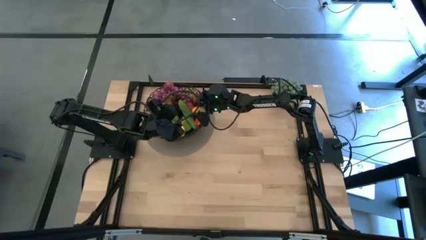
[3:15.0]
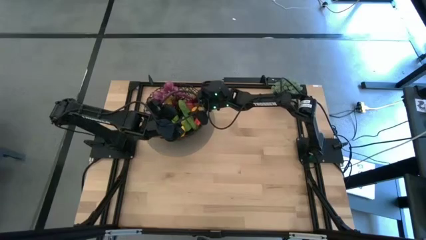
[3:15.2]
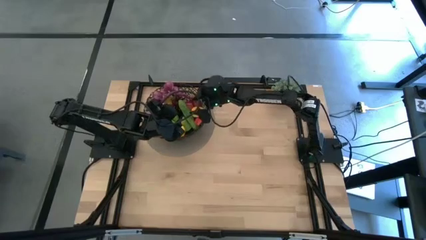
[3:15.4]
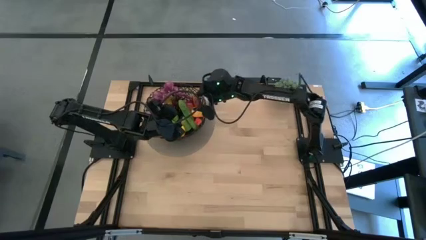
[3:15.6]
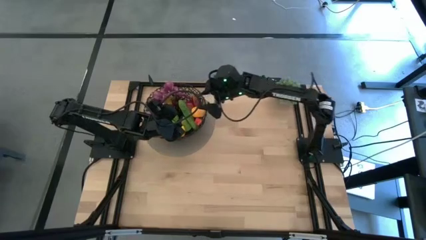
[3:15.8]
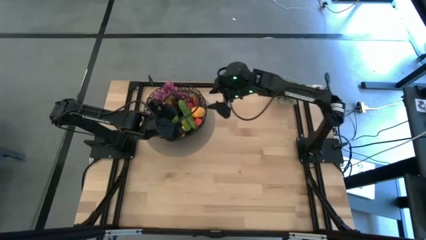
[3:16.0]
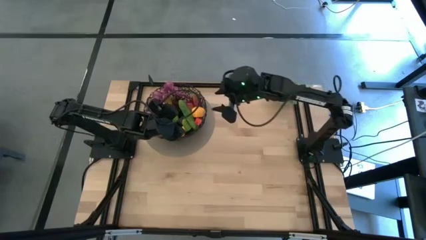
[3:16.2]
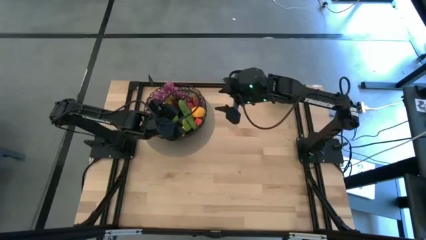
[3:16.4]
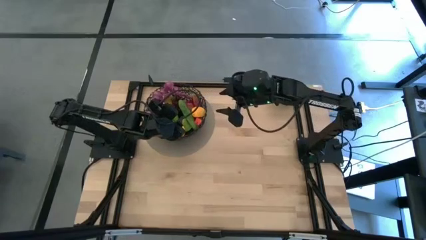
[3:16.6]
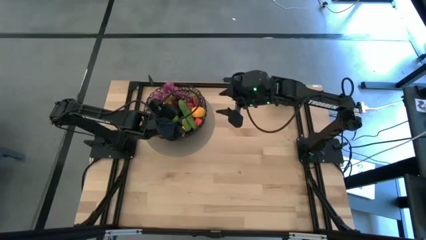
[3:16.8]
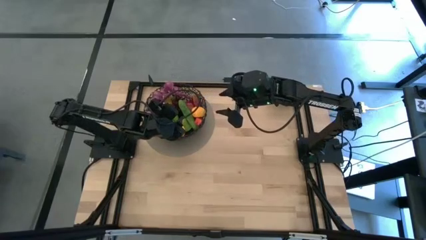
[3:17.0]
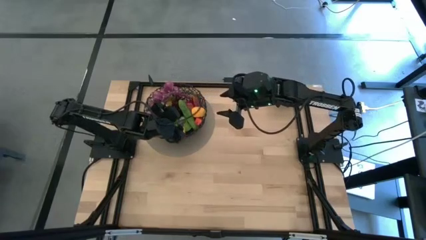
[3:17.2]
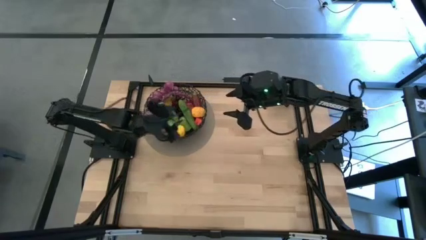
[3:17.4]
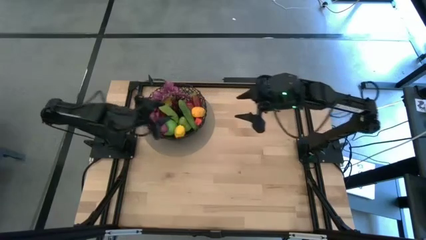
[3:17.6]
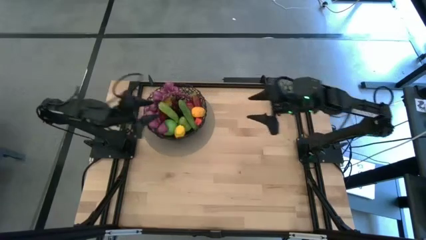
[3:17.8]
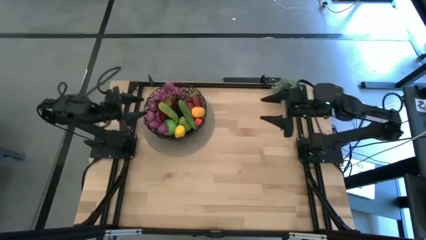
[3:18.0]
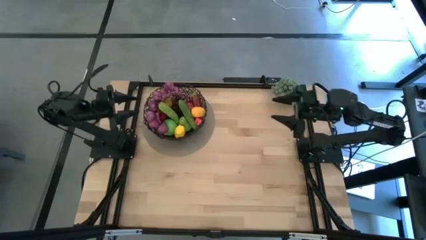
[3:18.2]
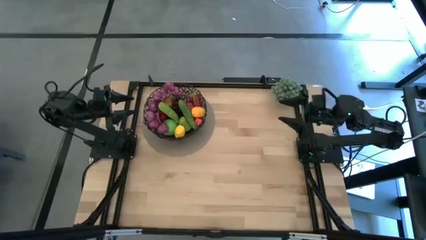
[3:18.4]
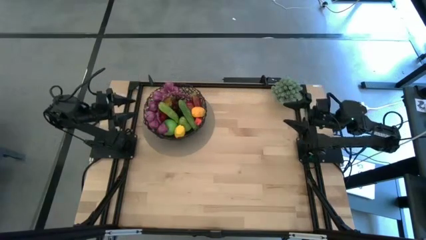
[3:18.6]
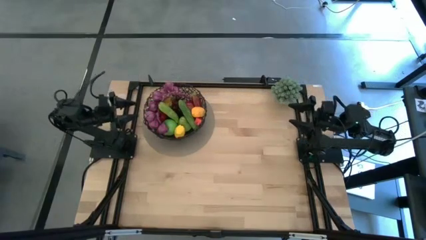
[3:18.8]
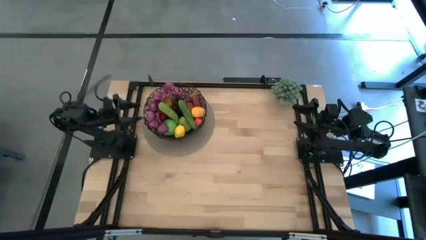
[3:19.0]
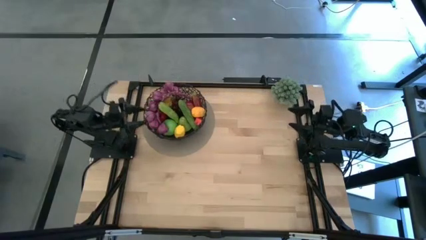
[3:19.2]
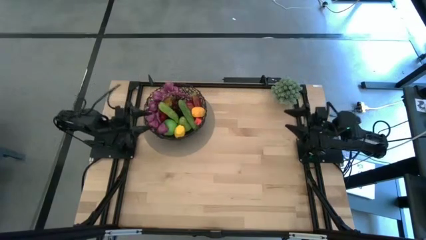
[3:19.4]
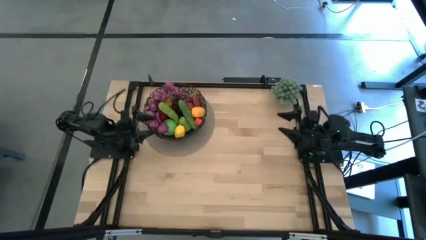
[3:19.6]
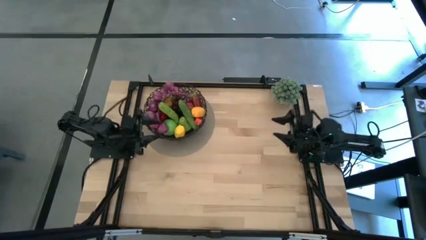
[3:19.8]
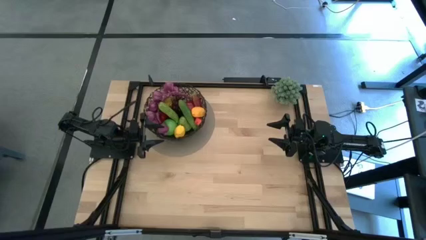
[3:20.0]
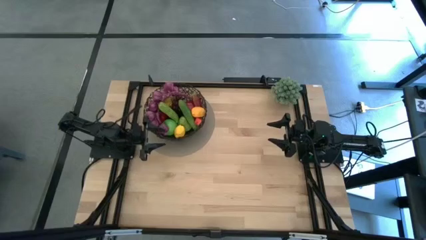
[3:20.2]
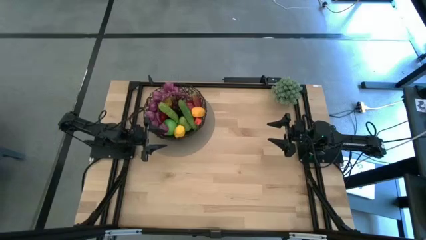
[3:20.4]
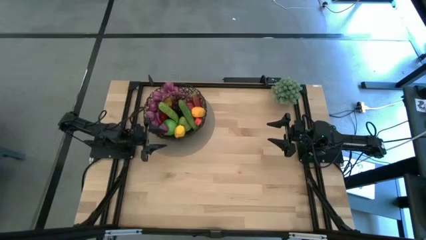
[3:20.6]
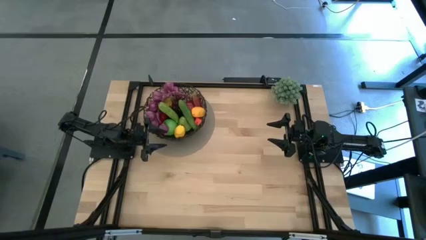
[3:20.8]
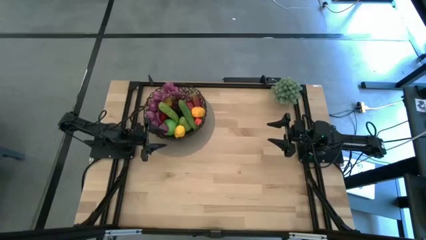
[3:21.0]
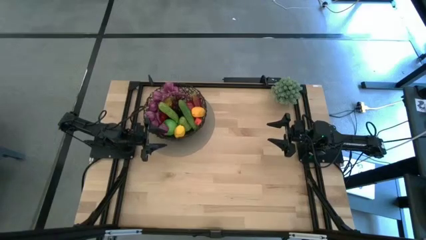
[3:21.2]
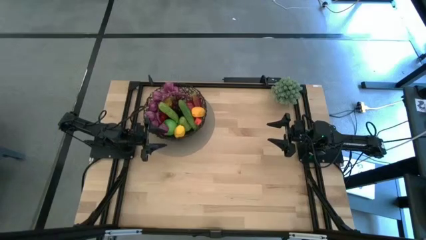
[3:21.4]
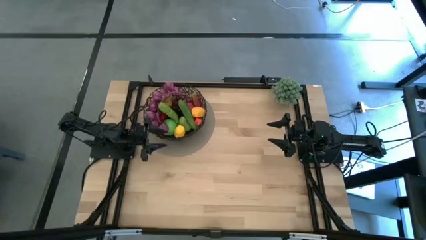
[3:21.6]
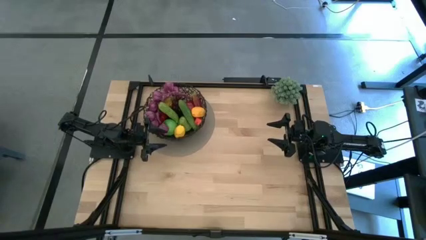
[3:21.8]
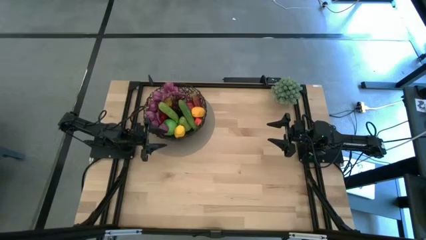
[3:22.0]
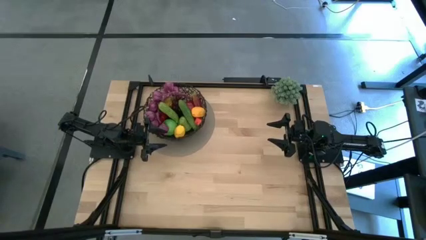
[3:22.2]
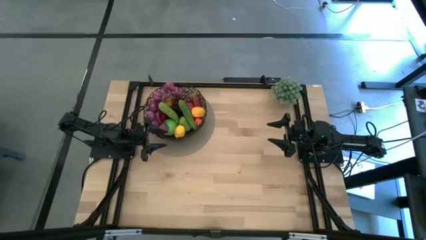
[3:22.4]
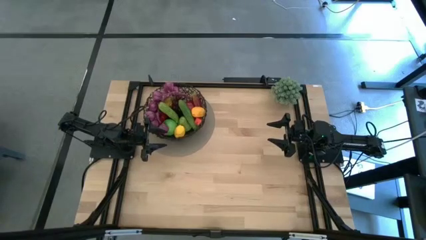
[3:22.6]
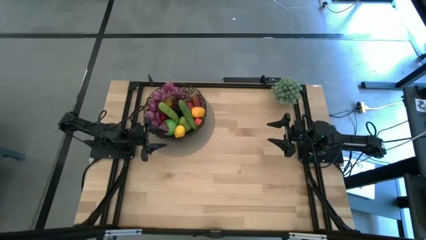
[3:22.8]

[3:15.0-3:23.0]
Task: Build produce basket
Return to Home Position

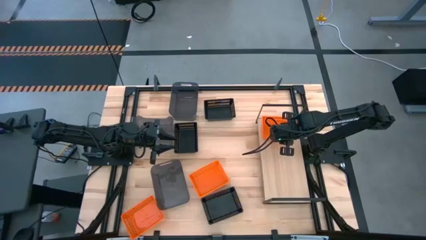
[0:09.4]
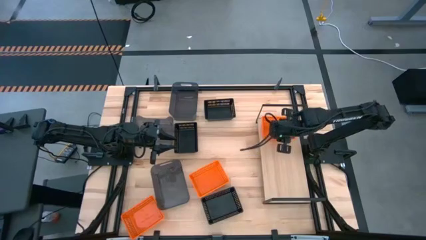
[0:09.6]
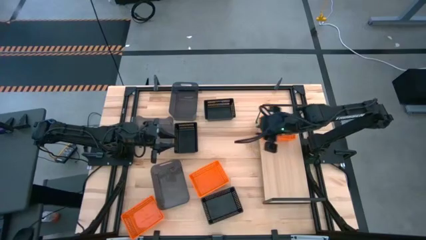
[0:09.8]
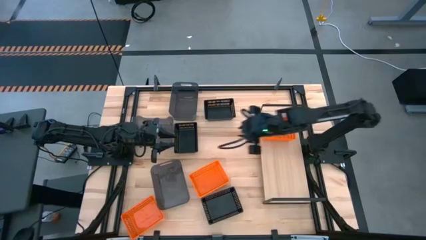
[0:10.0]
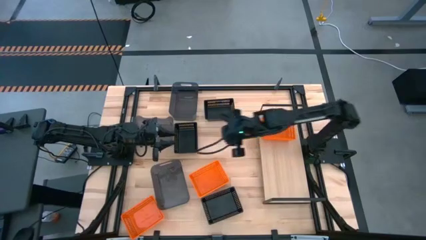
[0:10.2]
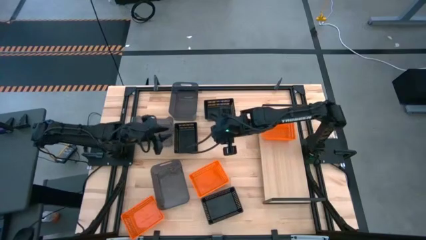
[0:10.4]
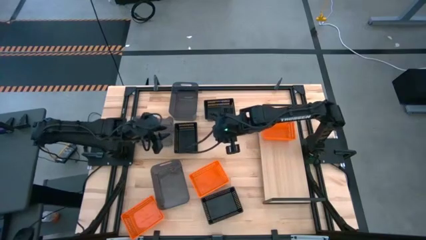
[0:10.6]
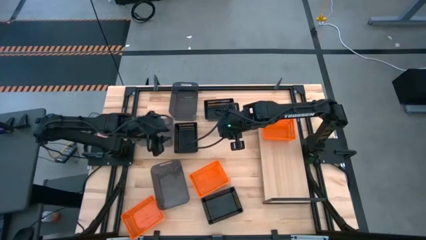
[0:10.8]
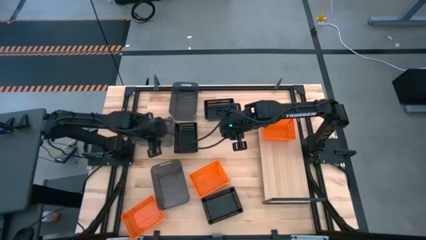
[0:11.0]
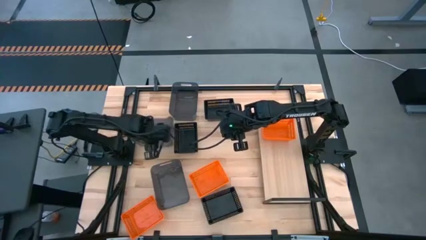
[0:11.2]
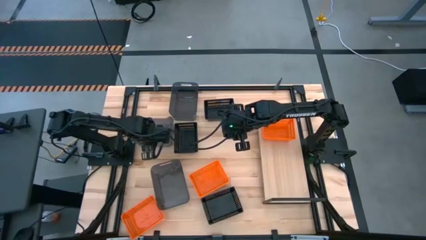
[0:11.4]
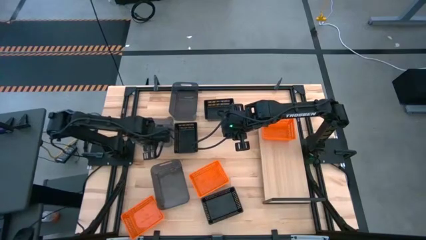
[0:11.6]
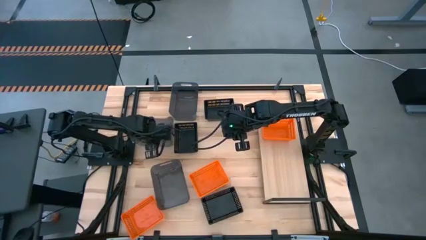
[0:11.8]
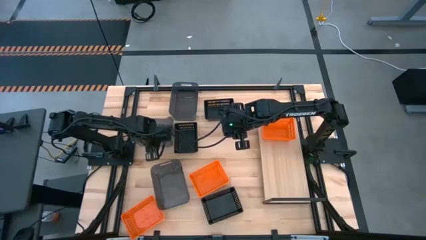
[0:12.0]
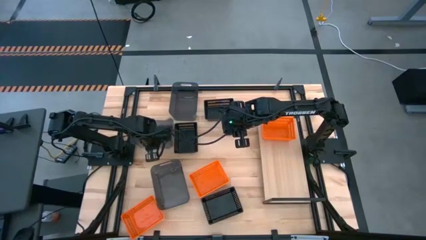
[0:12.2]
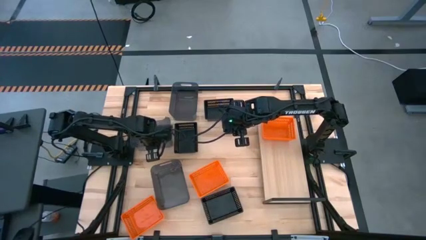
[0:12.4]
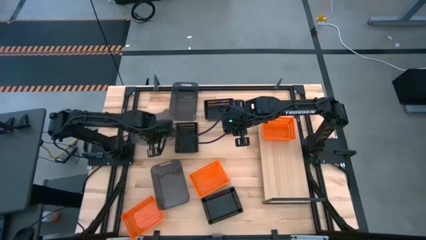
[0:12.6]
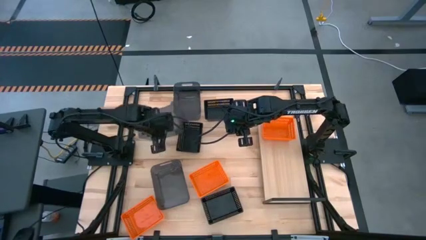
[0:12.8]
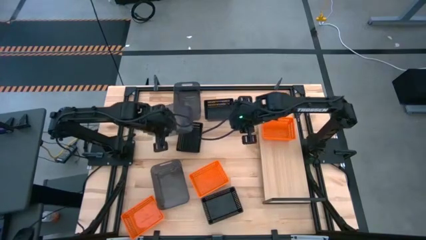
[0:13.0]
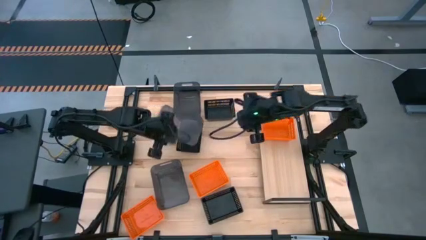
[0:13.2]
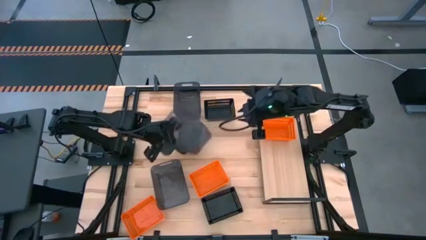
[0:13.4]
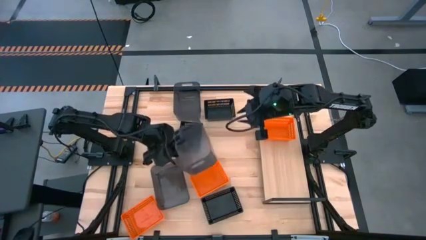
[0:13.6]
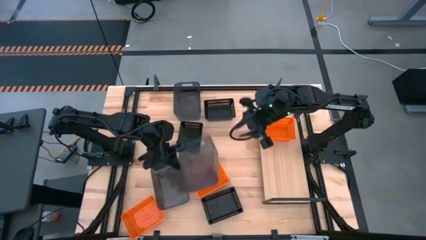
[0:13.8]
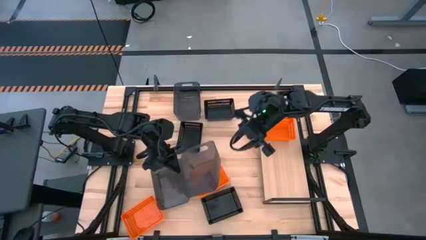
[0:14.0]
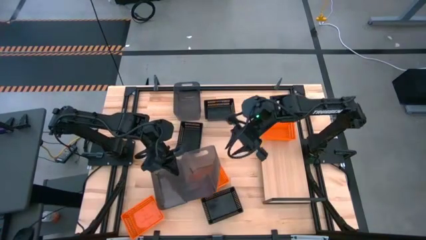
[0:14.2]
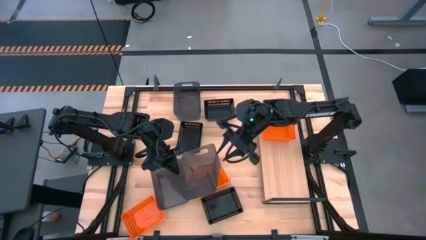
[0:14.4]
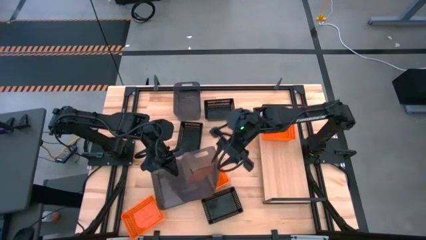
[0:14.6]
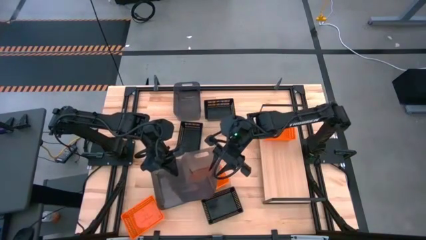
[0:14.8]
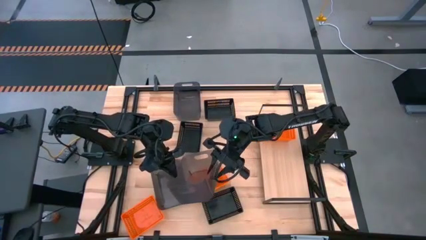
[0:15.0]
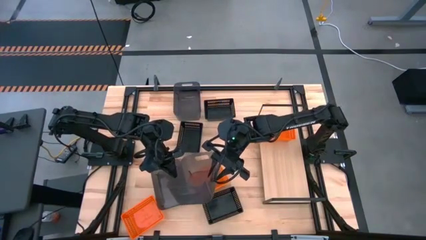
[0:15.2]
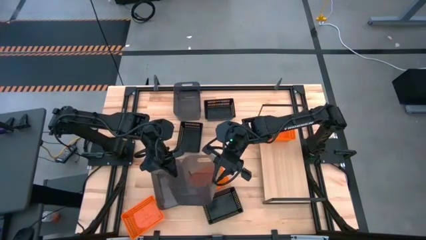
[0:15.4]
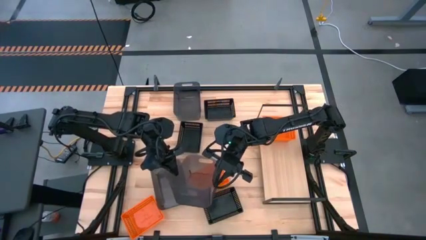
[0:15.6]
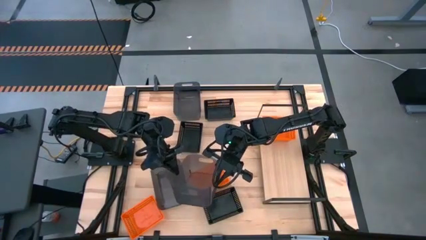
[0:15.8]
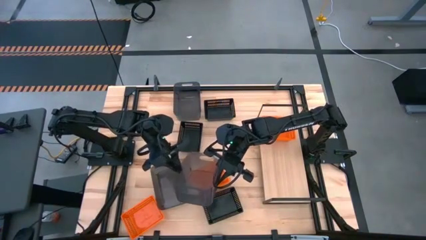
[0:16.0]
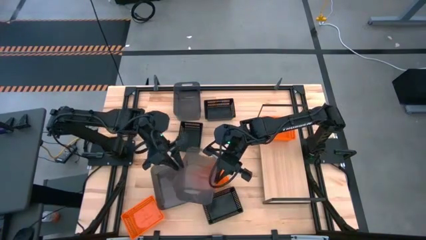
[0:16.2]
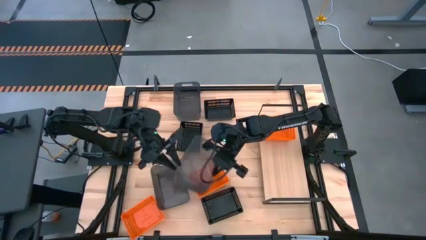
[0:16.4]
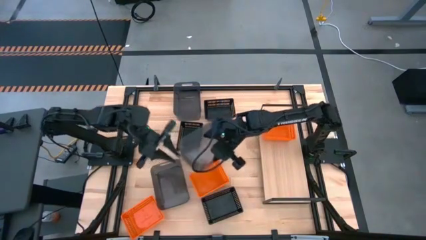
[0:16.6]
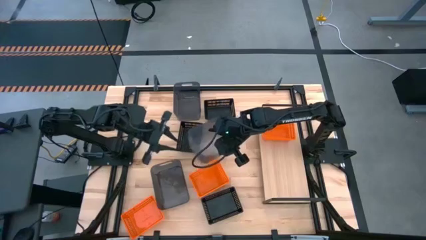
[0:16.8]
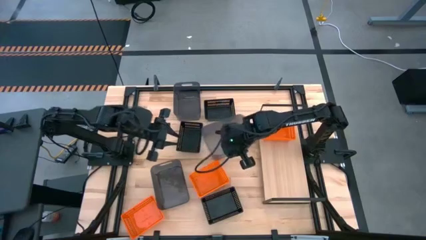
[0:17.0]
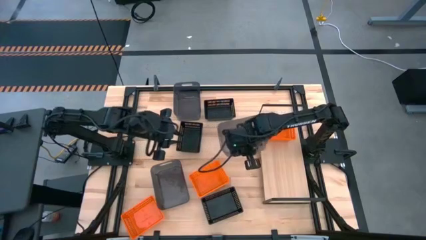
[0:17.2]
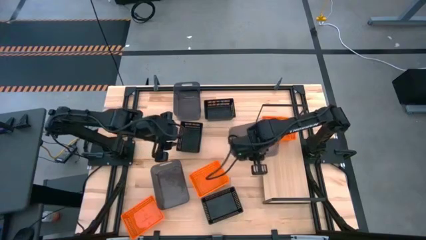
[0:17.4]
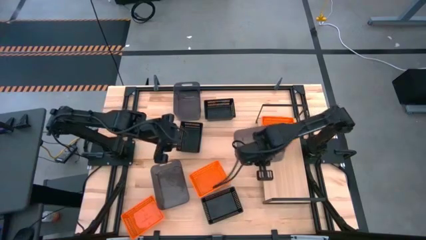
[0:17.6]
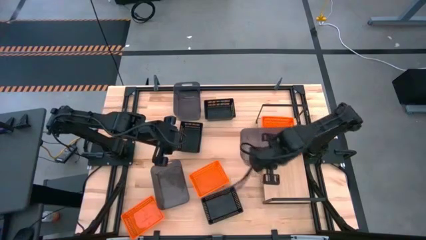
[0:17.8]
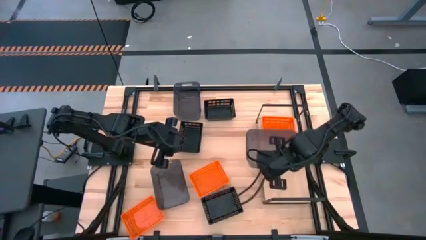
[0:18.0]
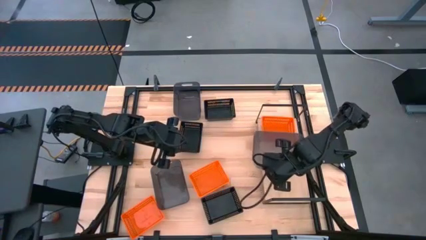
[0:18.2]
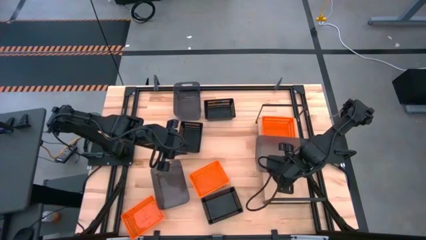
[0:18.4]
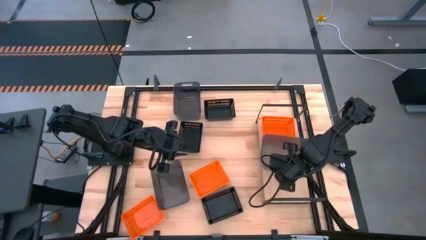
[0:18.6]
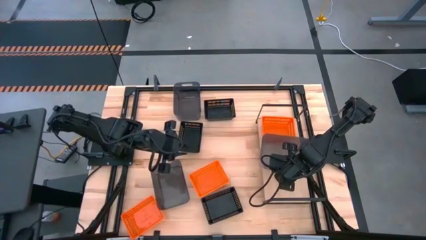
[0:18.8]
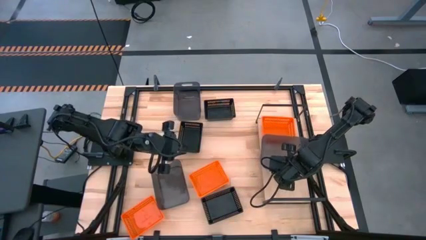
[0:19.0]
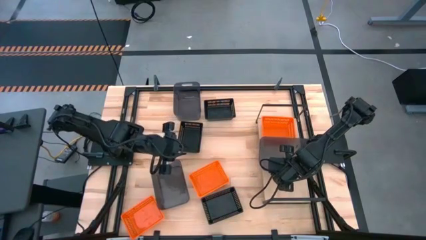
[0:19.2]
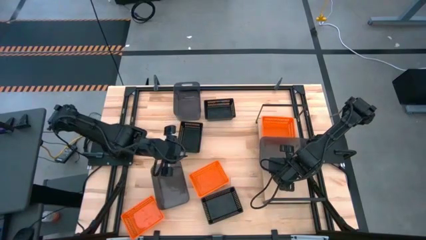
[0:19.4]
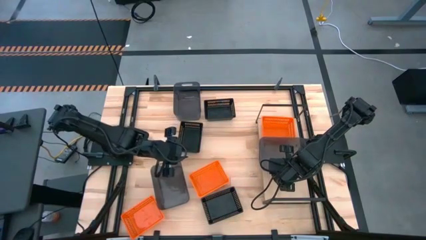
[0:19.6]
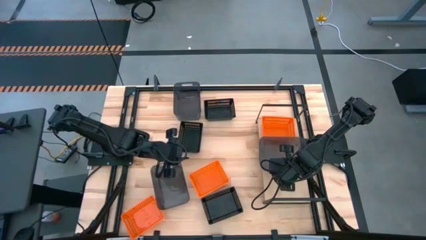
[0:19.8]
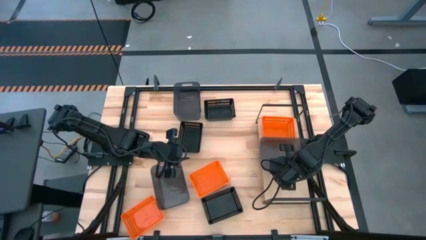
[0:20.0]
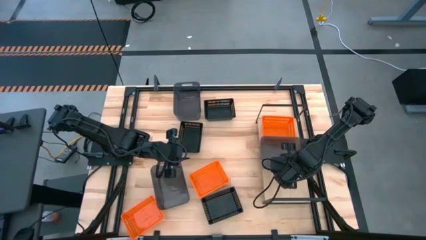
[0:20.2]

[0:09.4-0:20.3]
Task: Stack baskets on shelf by color
Put the middle black transparent bin on the shelf
